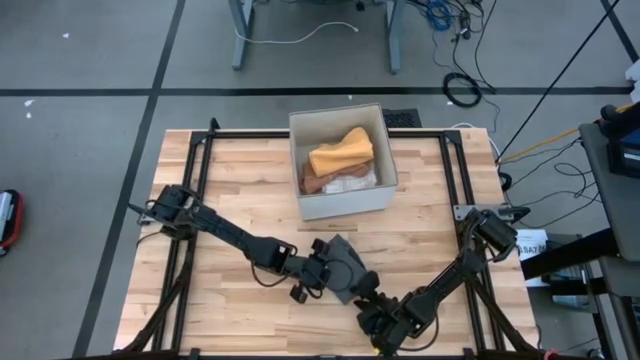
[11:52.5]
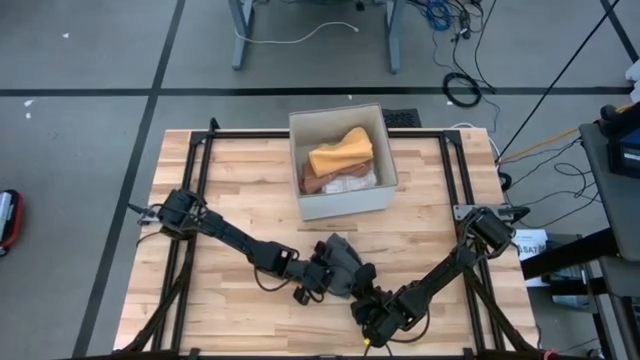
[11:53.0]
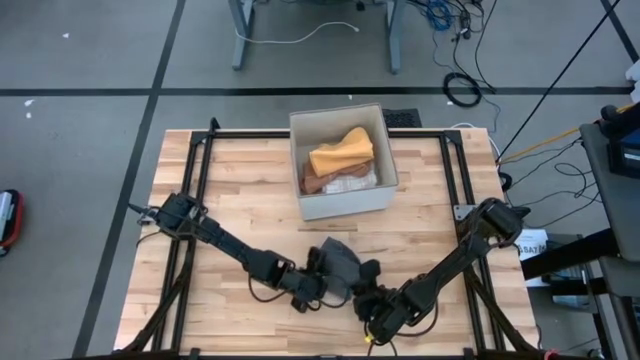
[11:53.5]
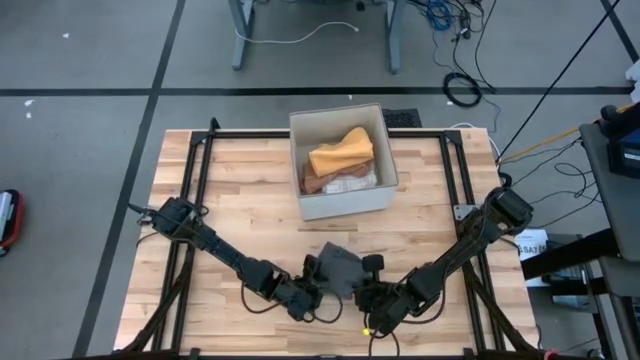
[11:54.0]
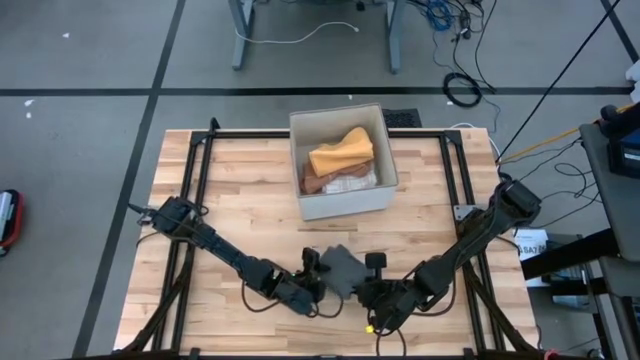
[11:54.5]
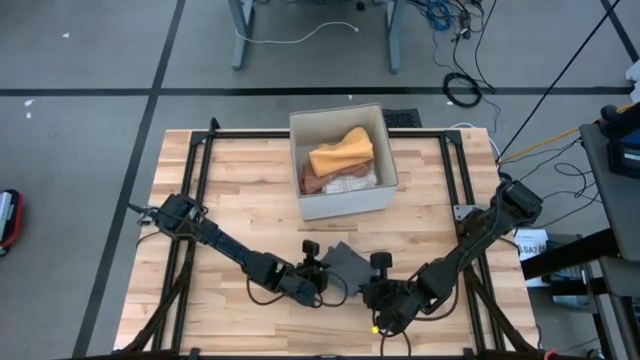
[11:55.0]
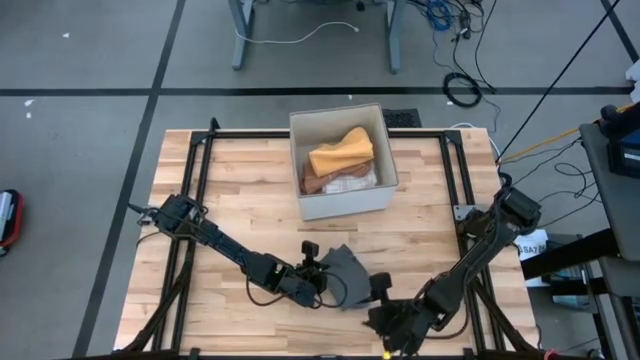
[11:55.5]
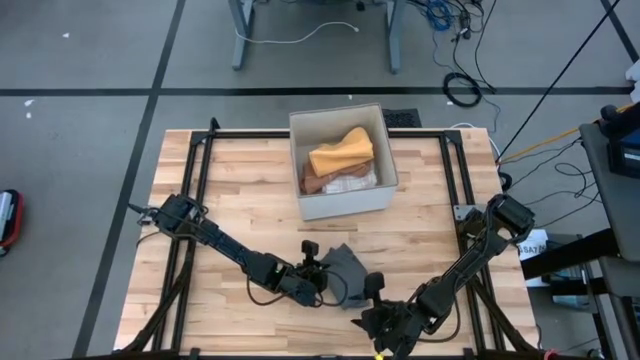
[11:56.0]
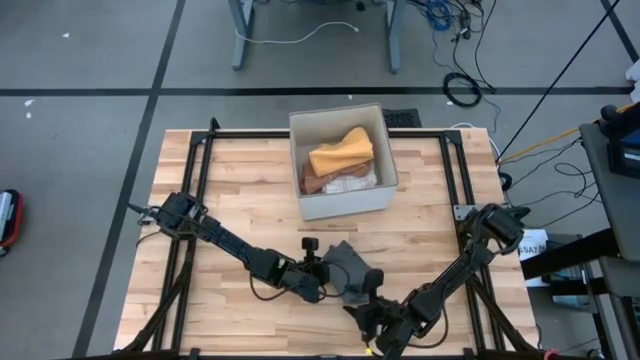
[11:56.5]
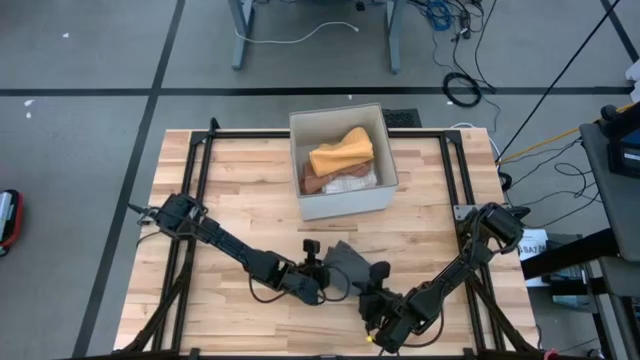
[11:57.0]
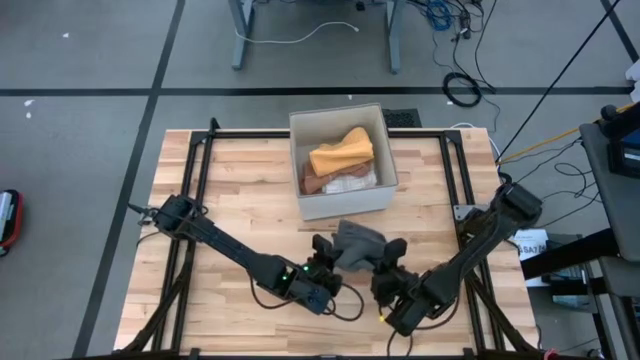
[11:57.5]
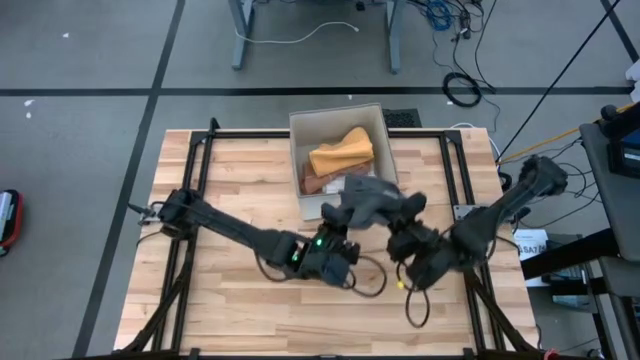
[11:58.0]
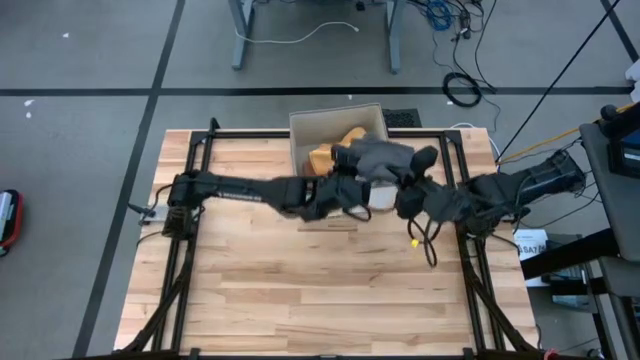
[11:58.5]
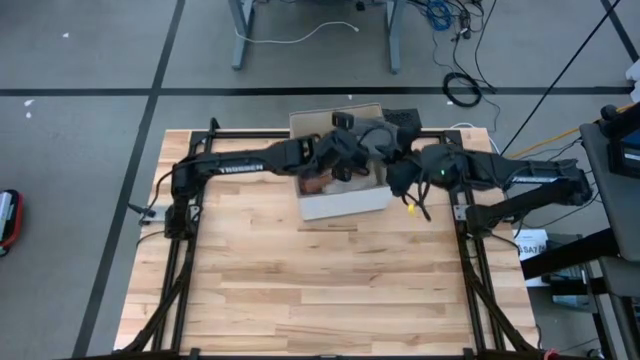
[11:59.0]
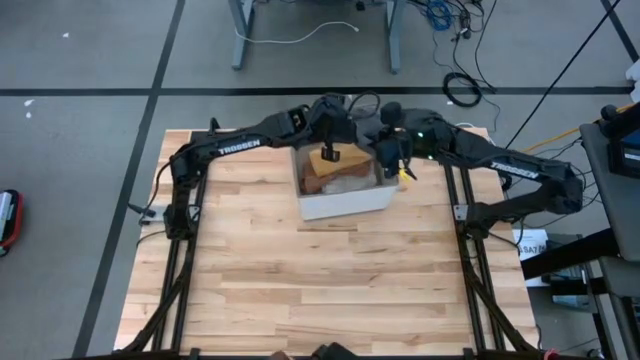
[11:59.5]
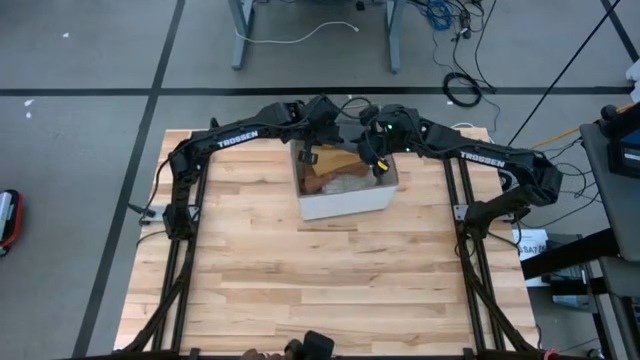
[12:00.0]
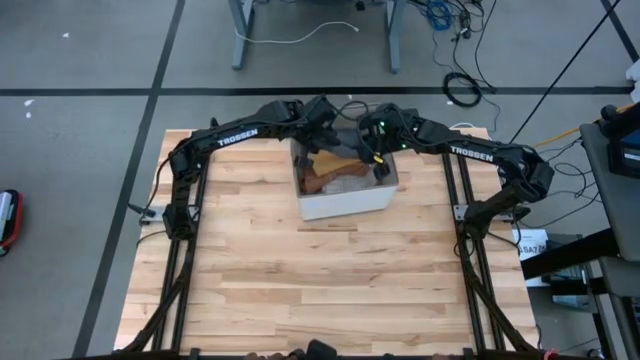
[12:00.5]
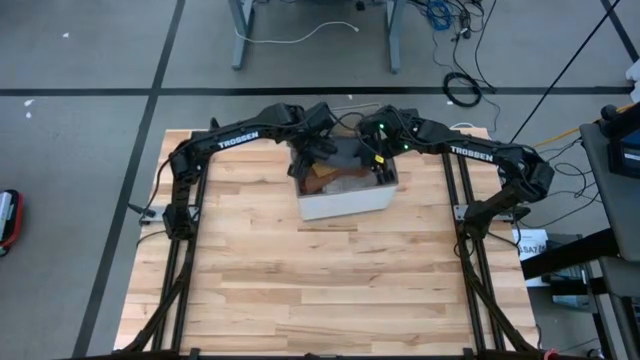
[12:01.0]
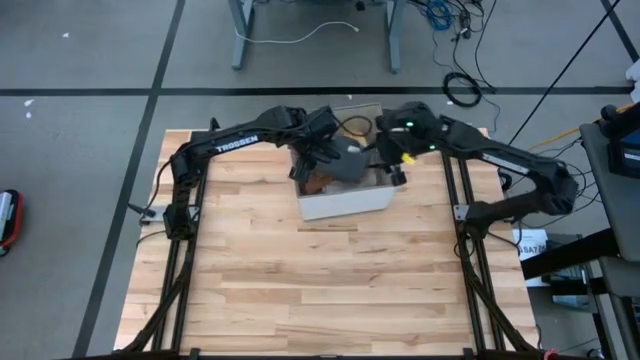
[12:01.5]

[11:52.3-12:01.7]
Task: Fold towel
Put the folded gray towel into the laundry bin

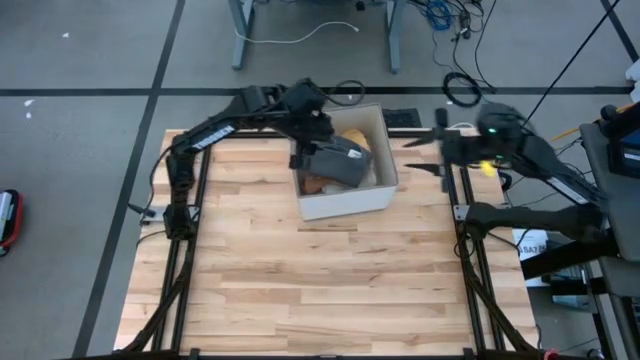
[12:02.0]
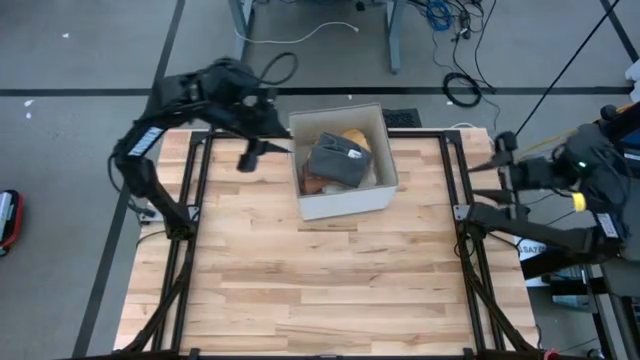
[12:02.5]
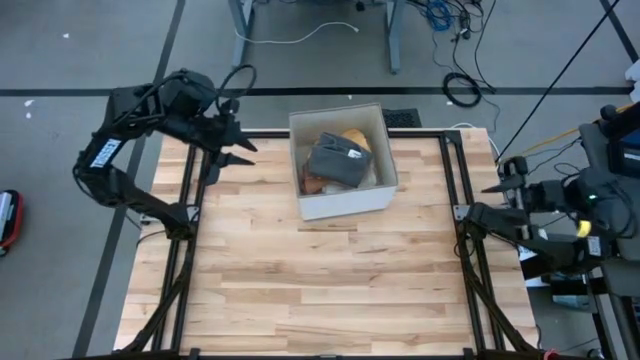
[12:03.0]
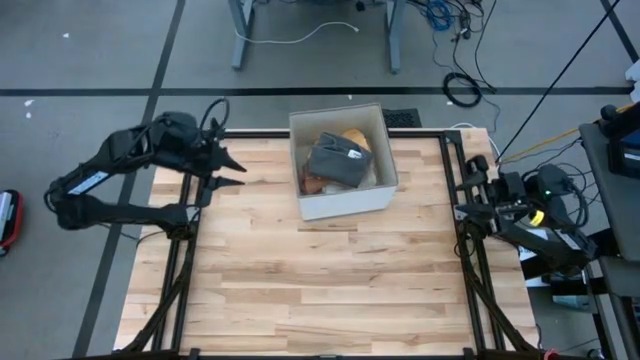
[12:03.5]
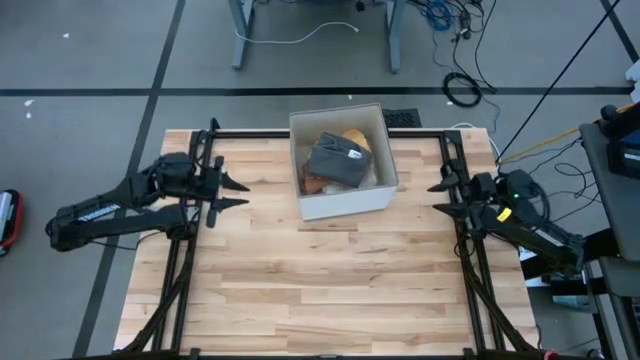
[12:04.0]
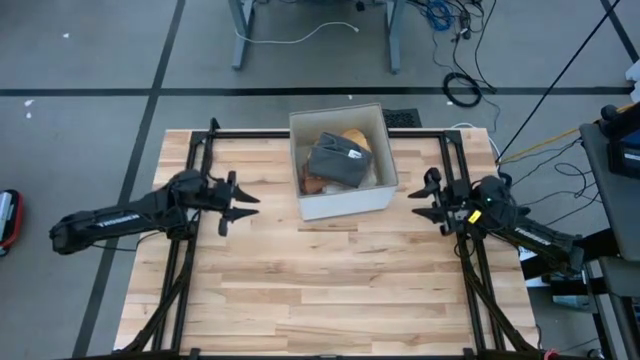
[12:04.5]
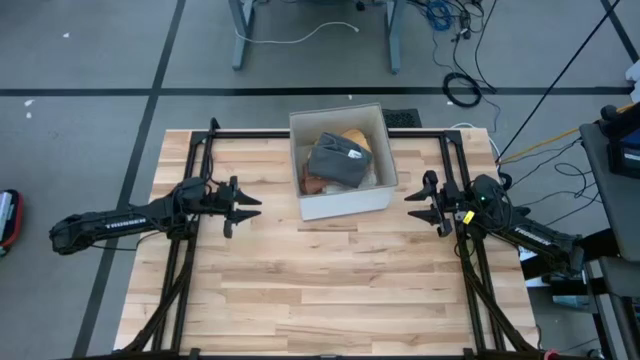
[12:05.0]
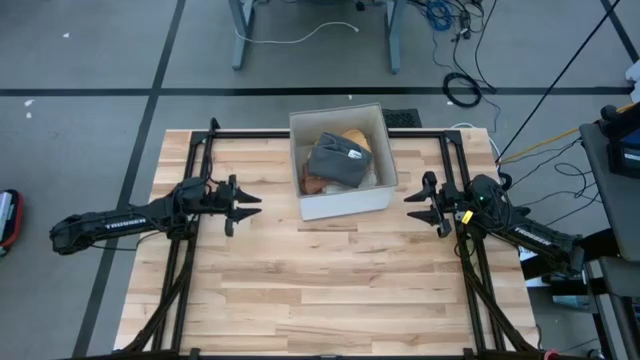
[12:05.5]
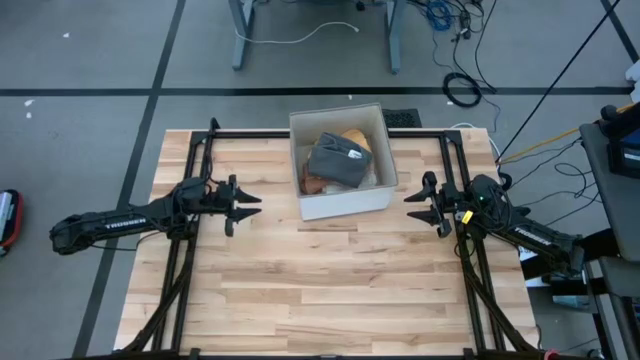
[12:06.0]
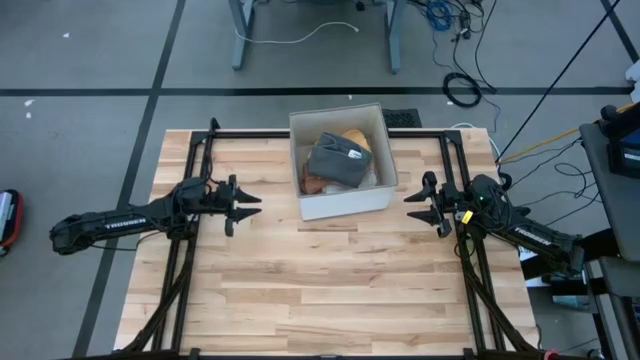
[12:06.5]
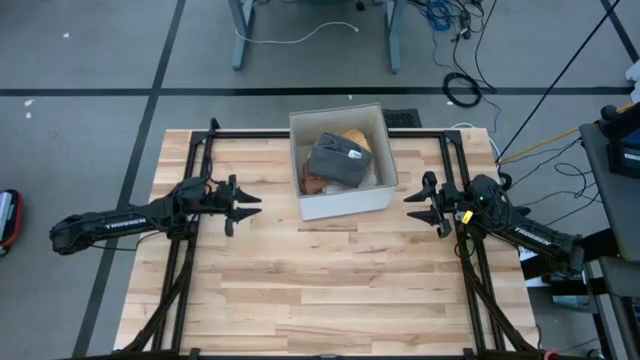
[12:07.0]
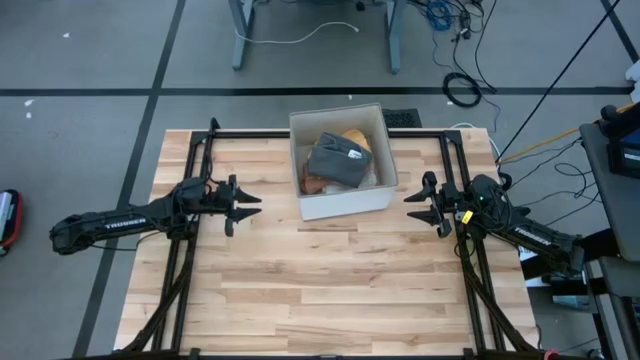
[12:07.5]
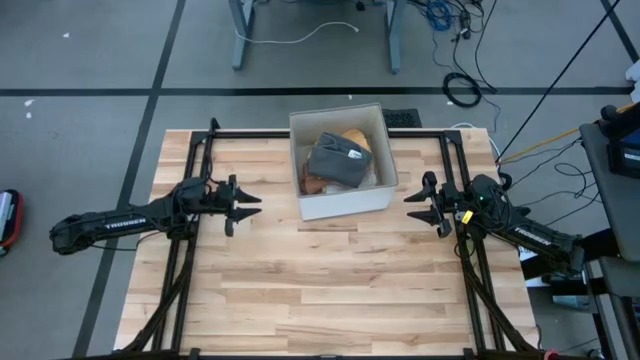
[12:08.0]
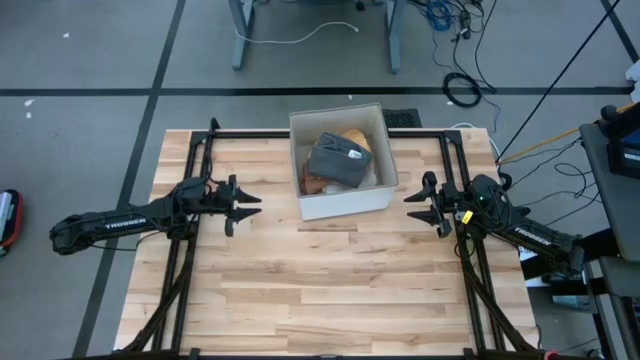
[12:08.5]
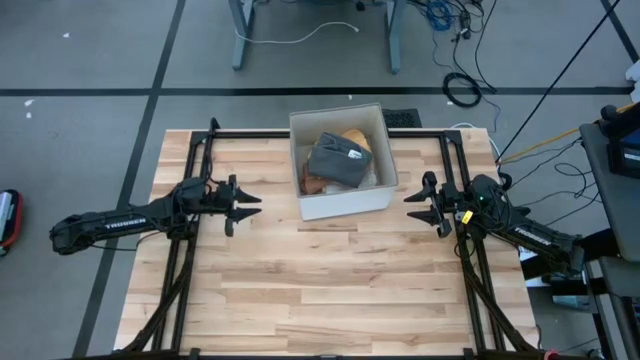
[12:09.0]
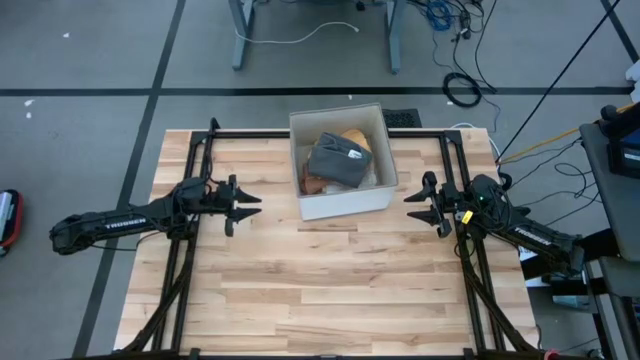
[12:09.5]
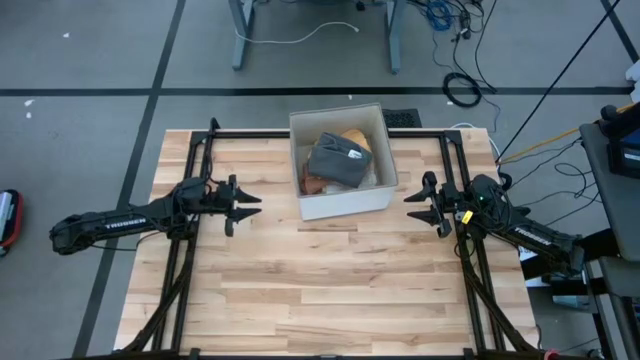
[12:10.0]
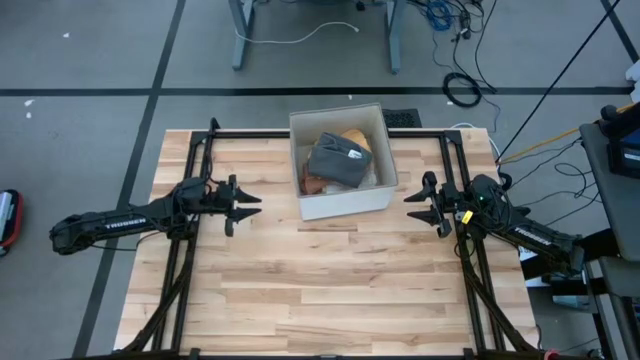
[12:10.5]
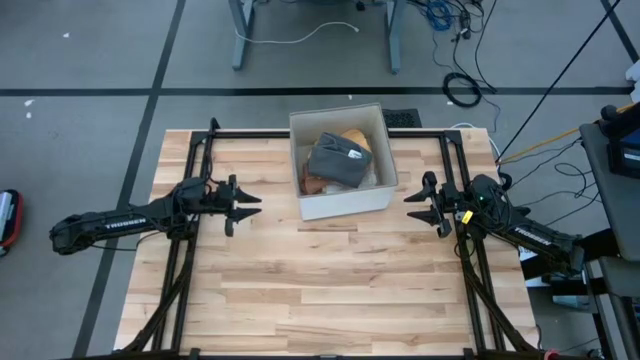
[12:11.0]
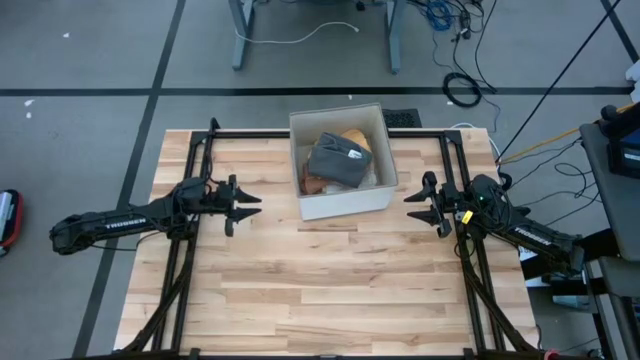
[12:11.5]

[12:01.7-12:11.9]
Return to Home Position

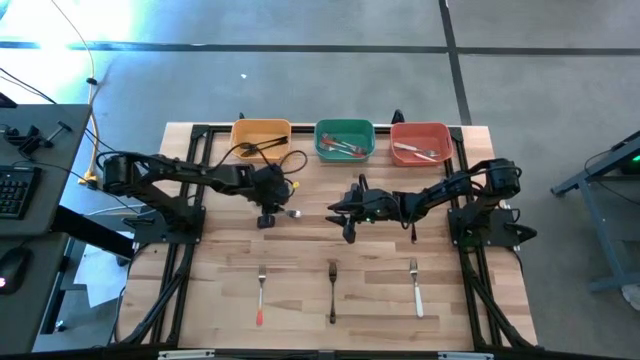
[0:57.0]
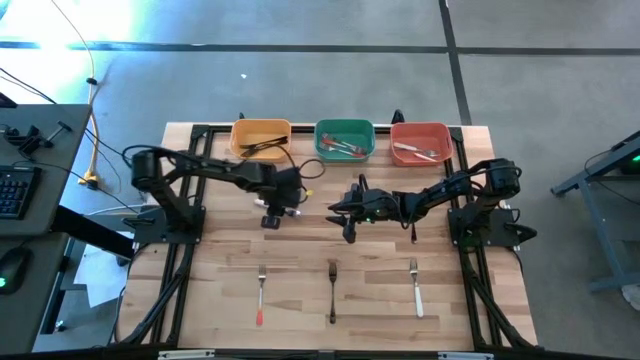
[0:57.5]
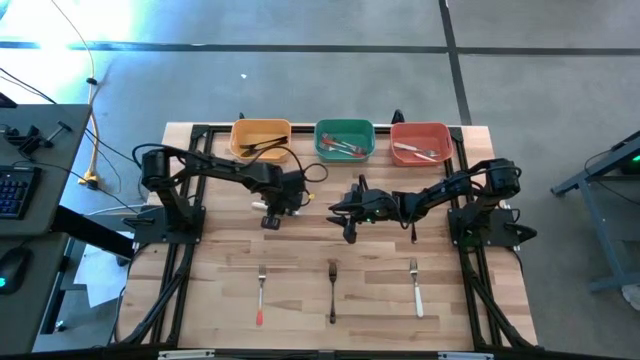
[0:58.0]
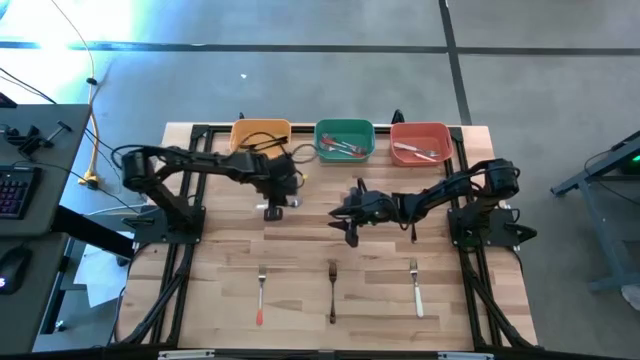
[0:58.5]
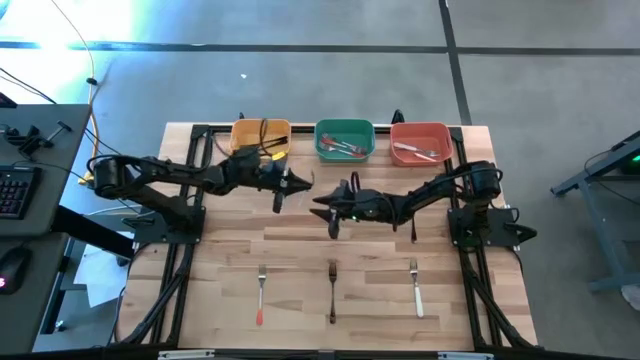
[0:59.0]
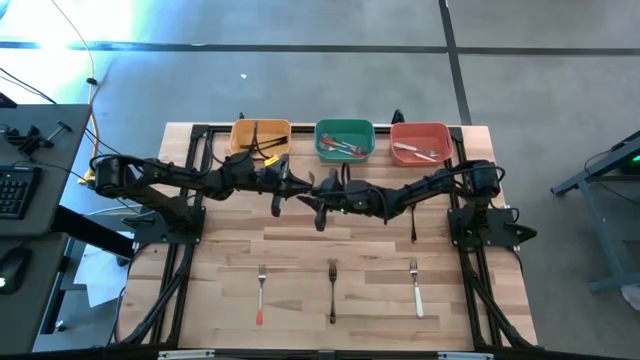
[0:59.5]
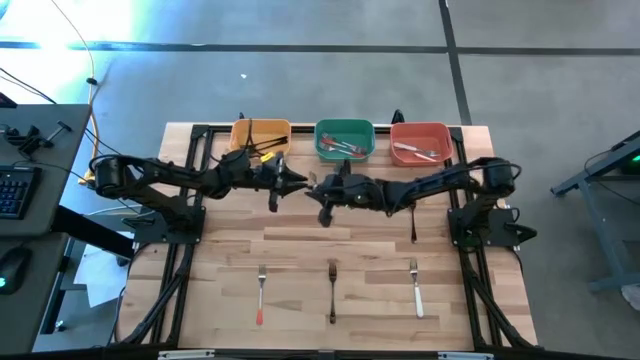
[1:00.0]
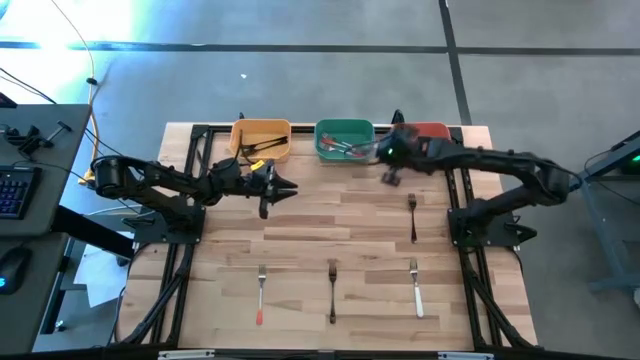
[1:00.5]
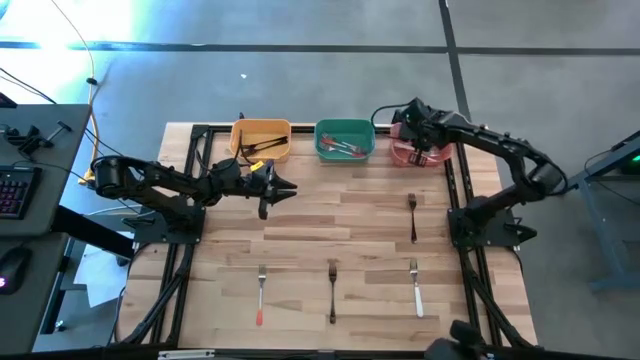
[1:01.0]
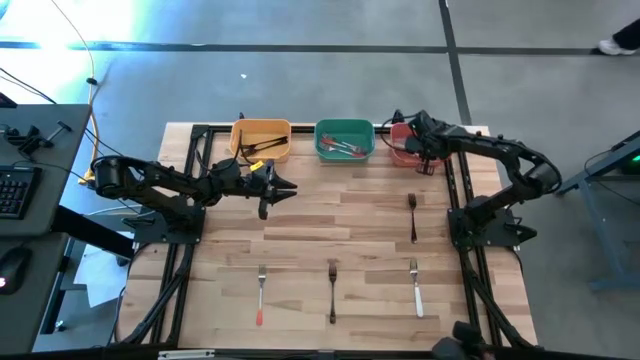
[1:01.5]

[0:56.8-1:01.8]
Task: Sort silverware by color (type)
Put the top white fork into the orange bin
